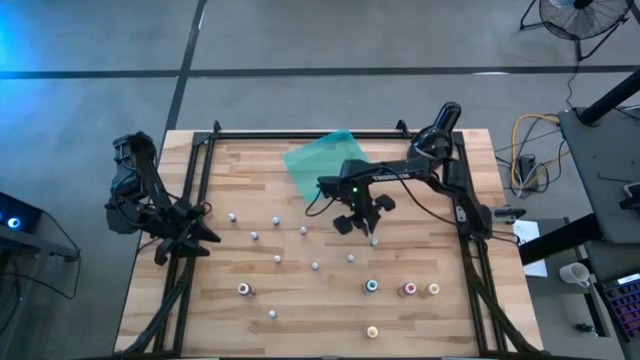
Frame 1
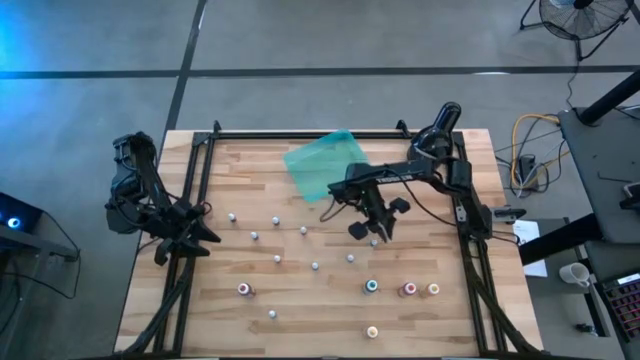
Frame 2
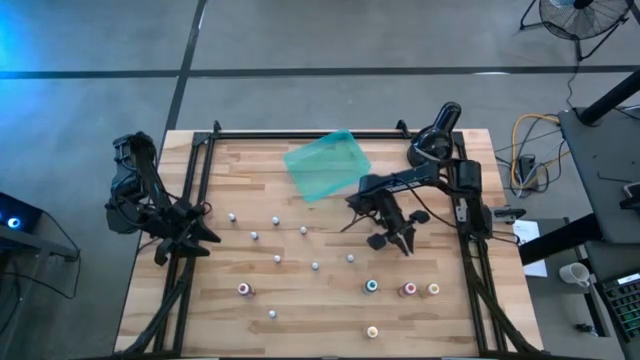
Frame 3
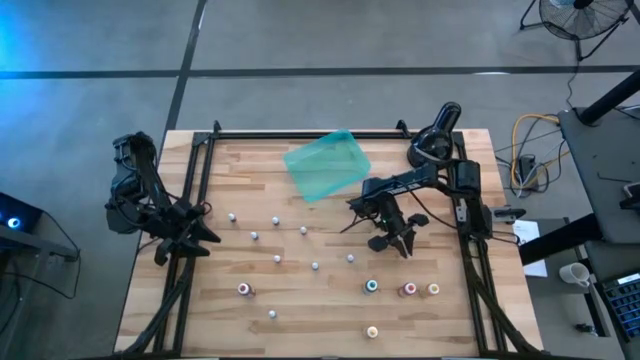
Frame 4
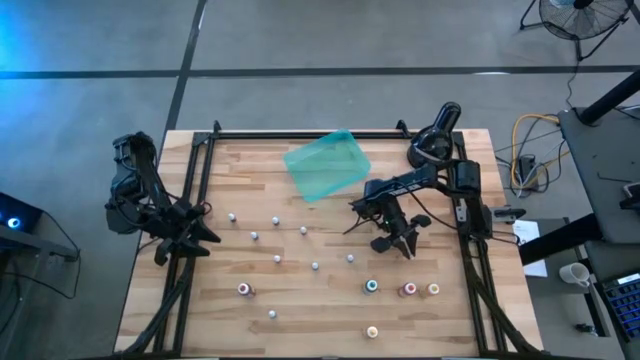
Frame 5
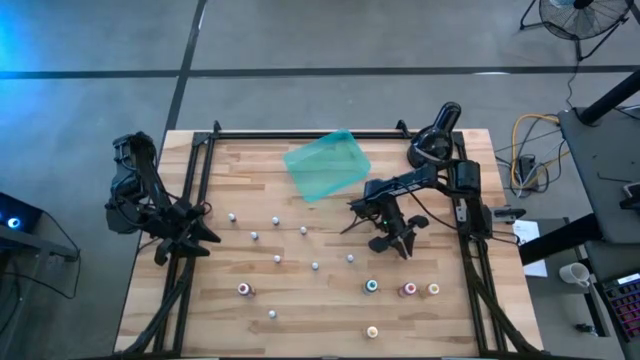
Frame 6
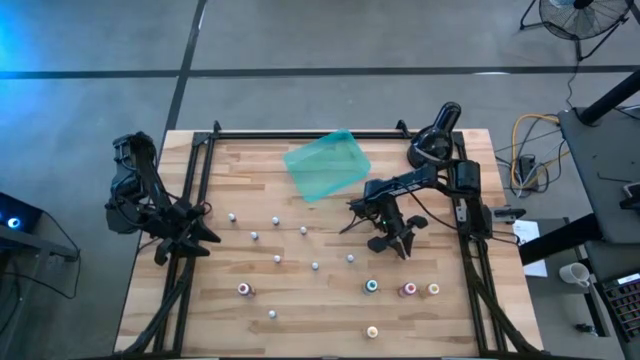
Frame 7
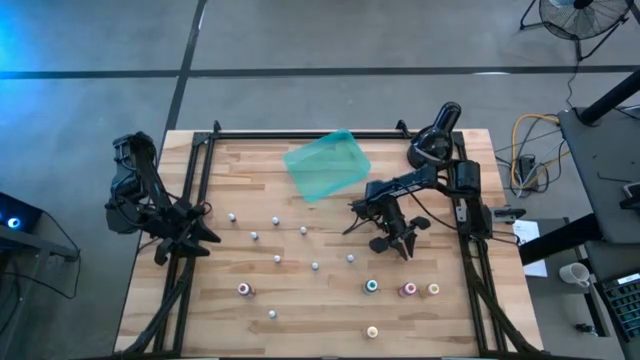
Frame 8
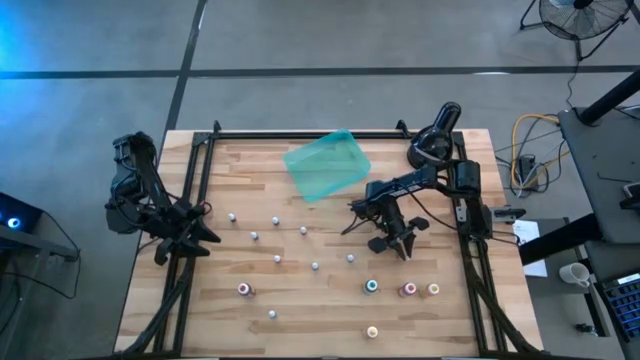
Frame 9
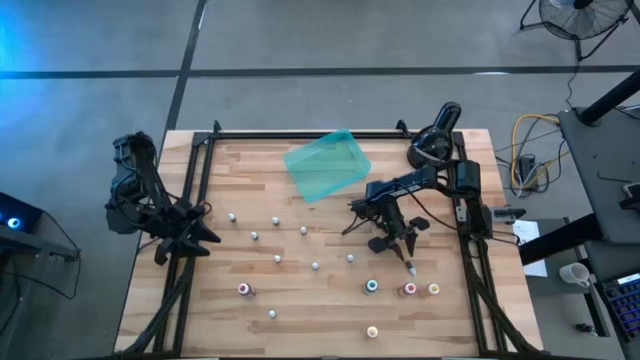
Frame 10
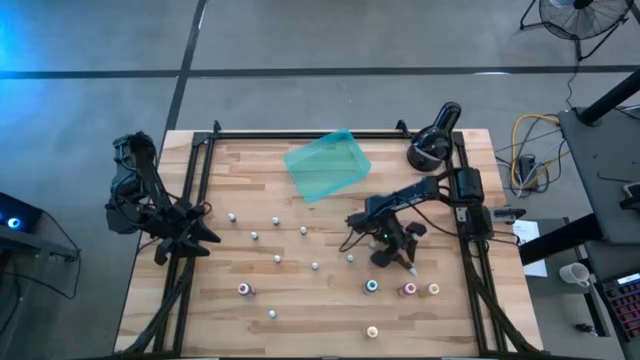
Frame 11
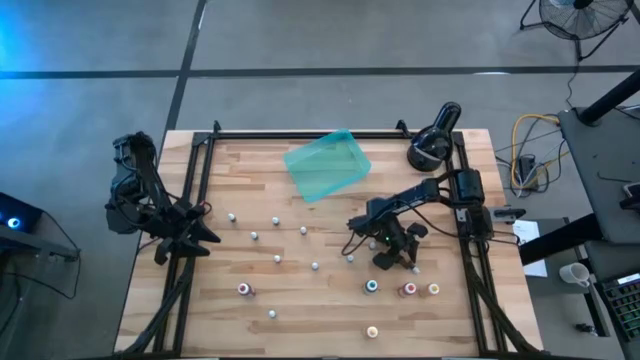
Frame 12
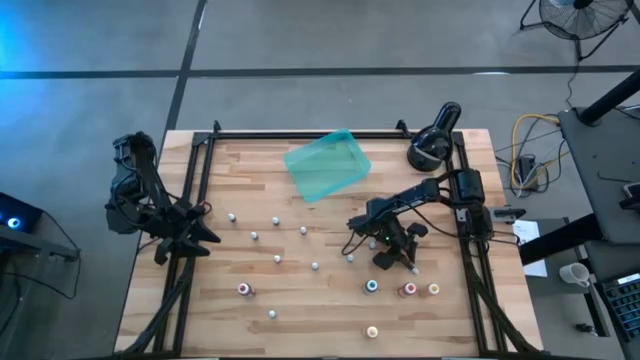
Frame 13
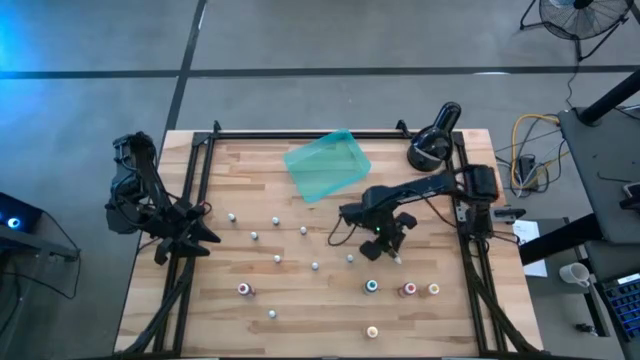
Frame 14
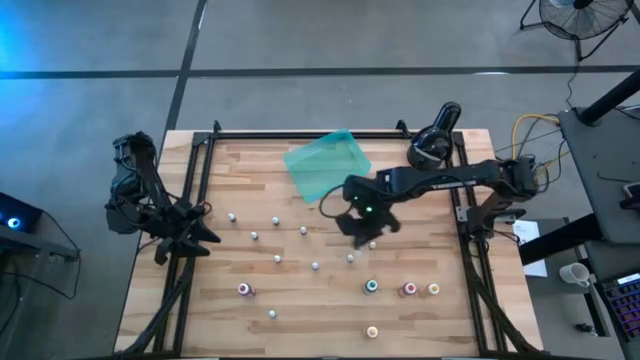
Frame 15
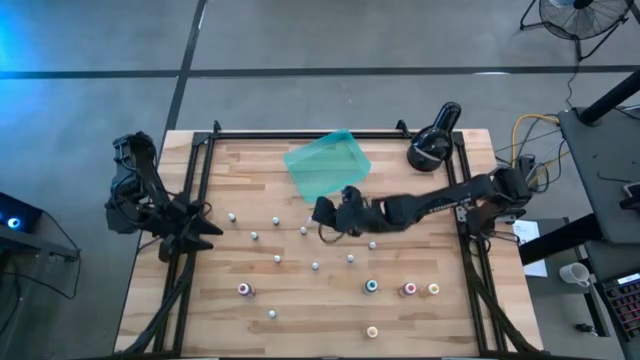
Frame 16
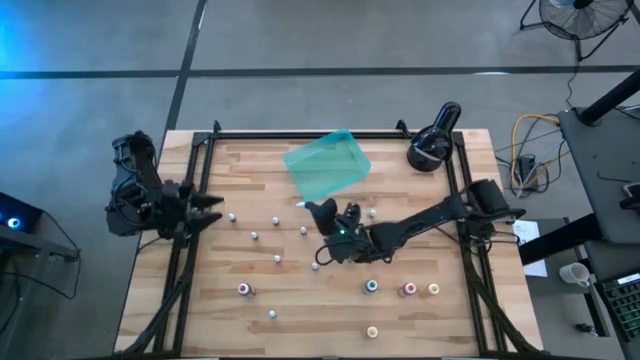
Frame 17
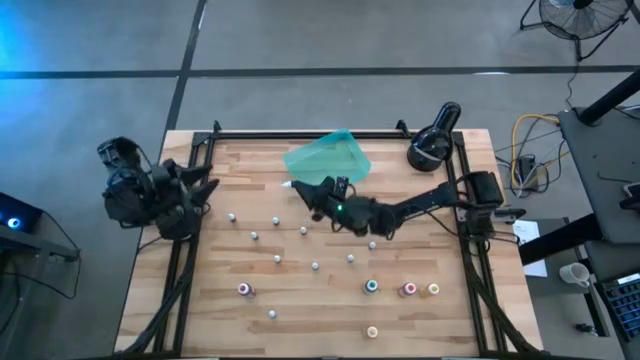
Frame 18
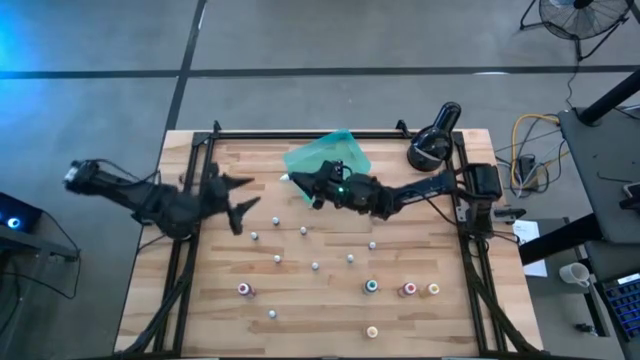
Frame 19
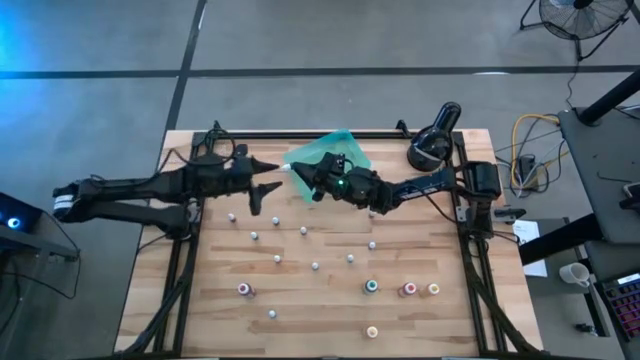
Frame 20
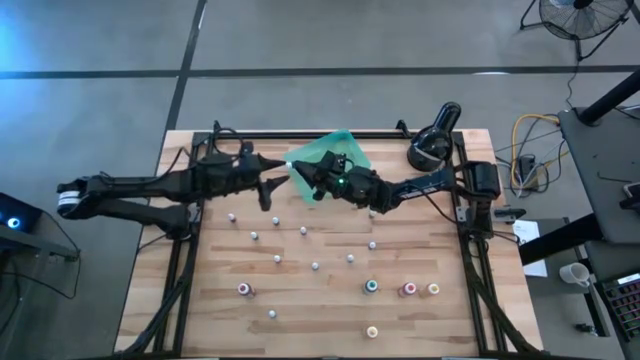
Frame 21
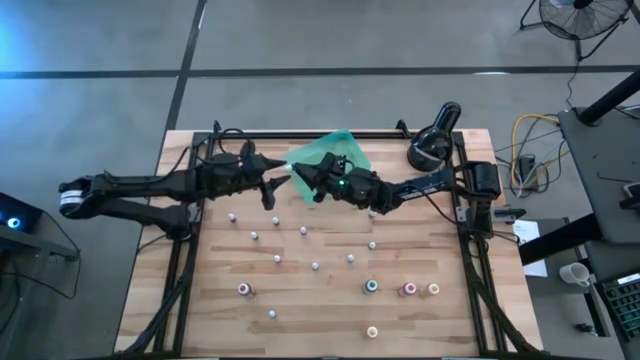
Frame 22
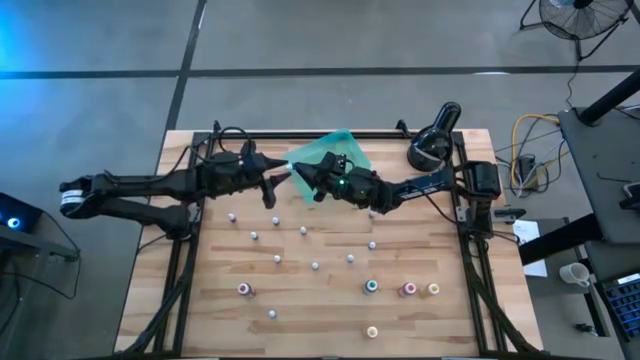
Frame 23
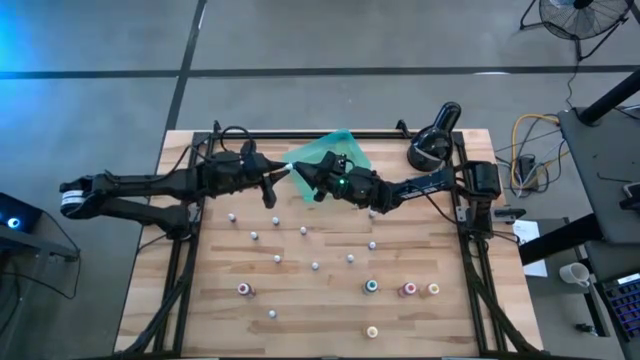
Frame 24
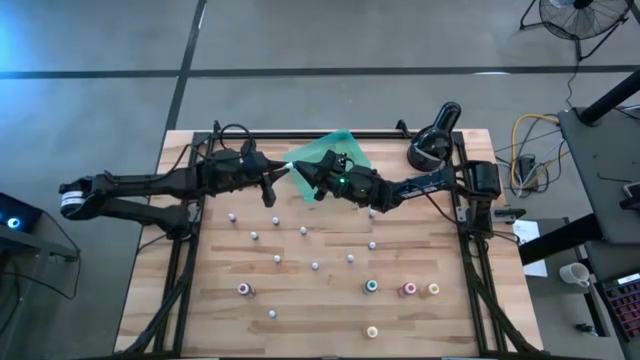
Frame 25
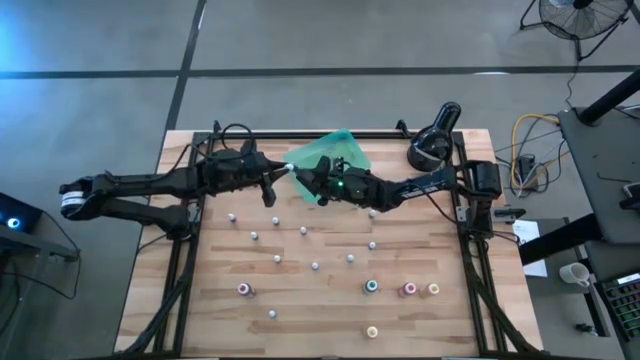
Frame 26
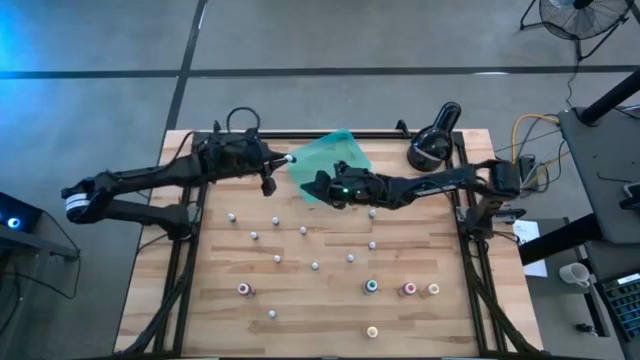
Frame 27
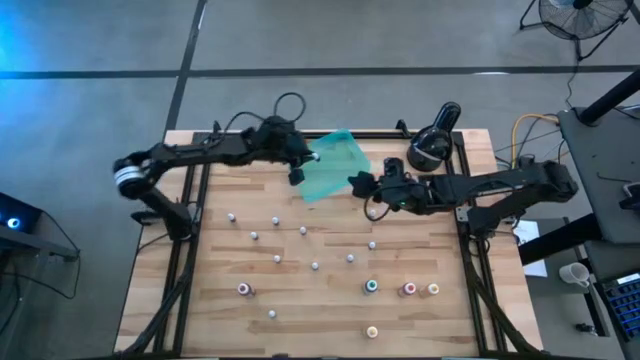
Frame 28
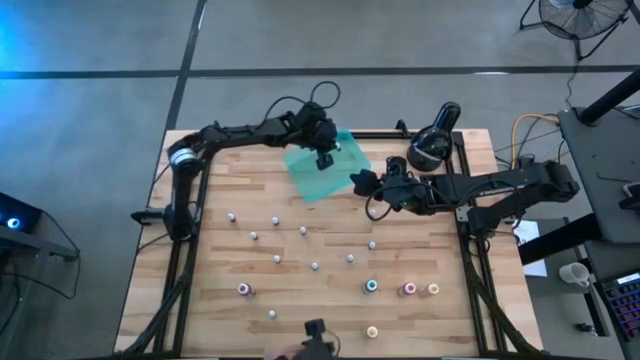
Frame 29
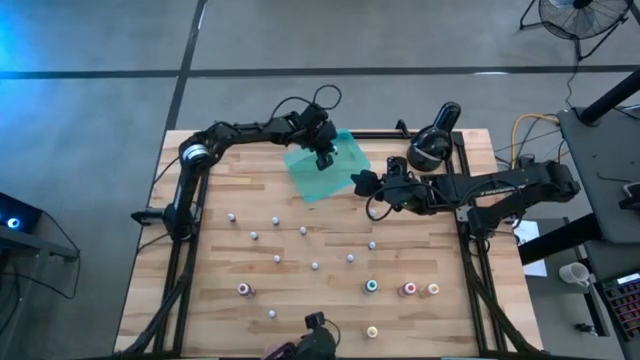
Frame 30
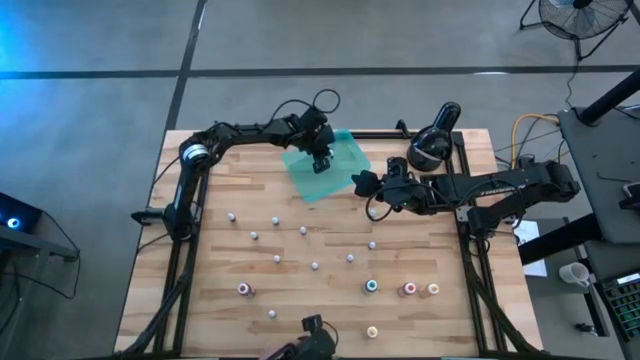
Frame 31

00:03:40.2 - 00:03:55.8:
Task: Pick & Place food coloring
Adjust the red small food coloring bottle

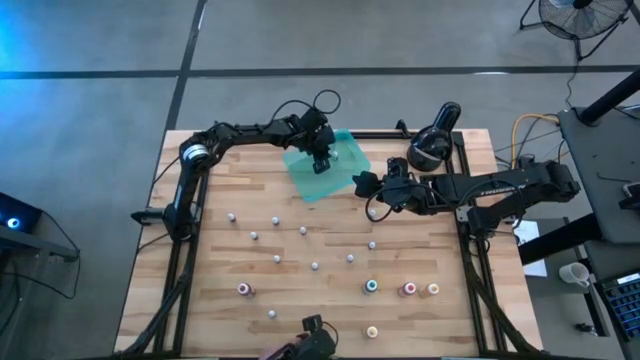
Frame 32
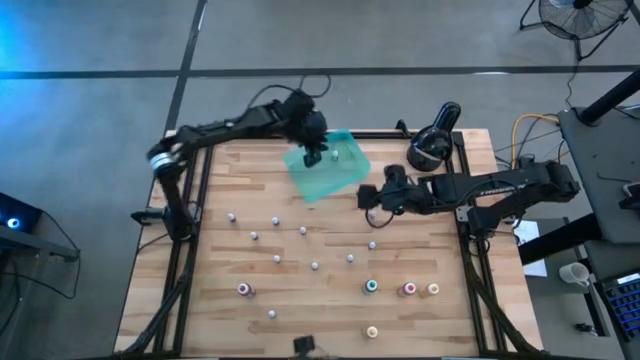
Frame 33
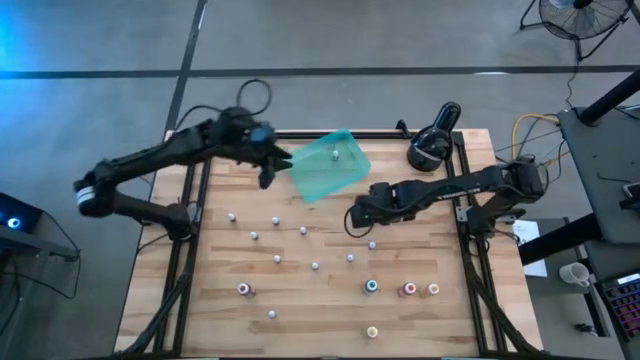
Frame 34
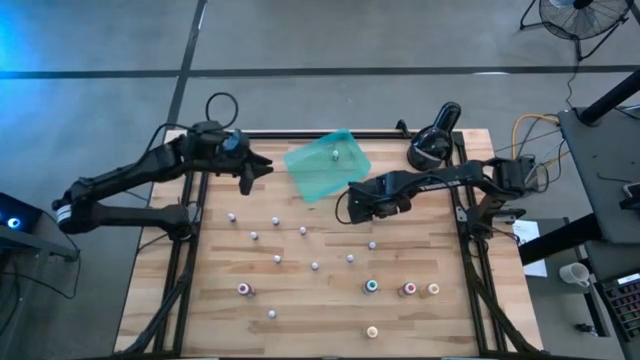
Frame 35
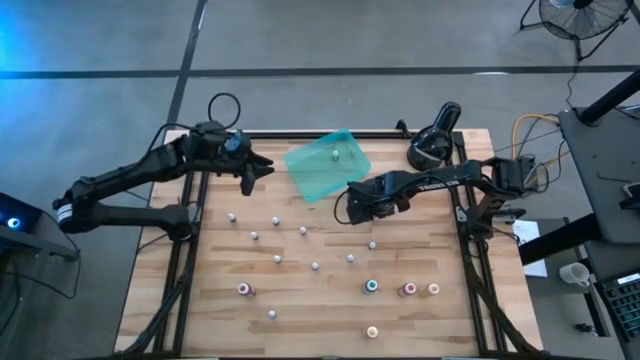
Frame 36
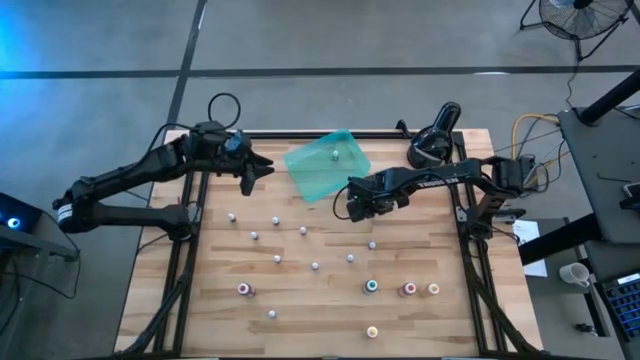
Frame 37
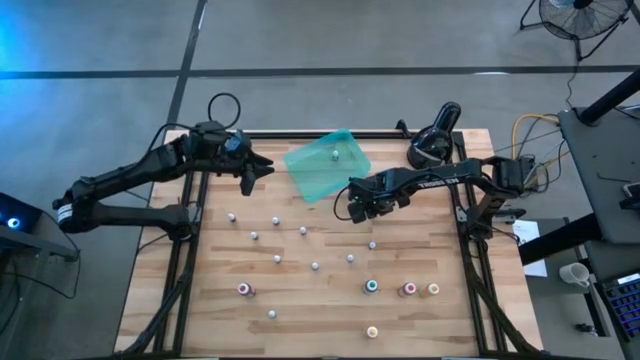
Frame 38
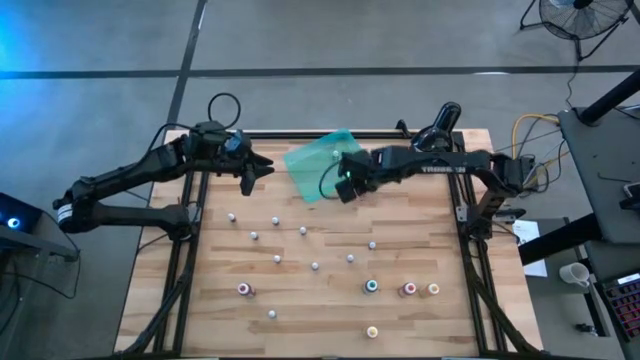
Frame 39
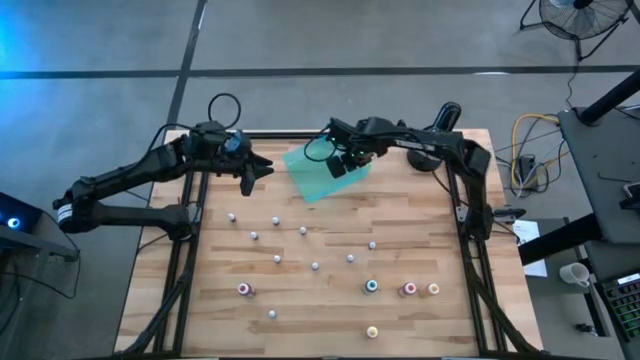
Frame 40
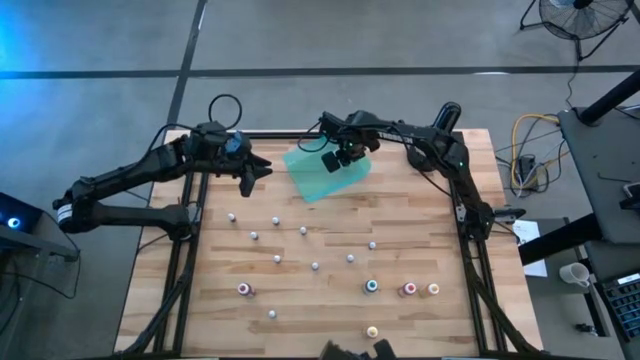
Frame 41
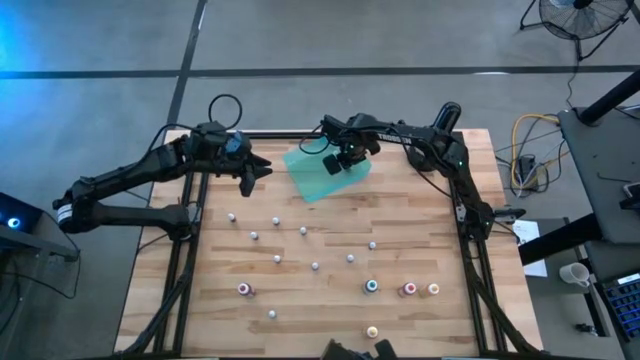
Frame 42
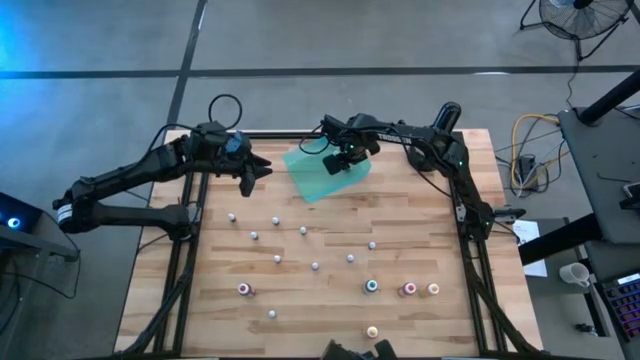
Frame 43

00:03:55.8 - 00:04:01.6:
Put the blue small food coloring into the green bin

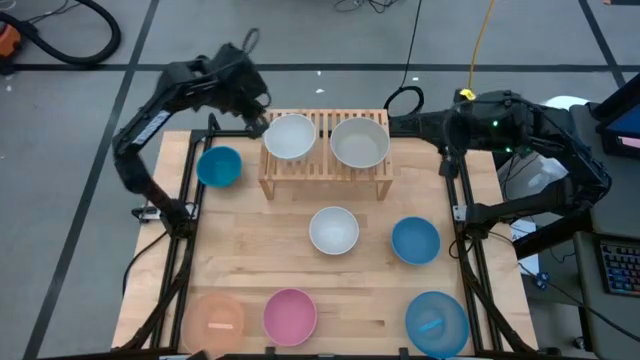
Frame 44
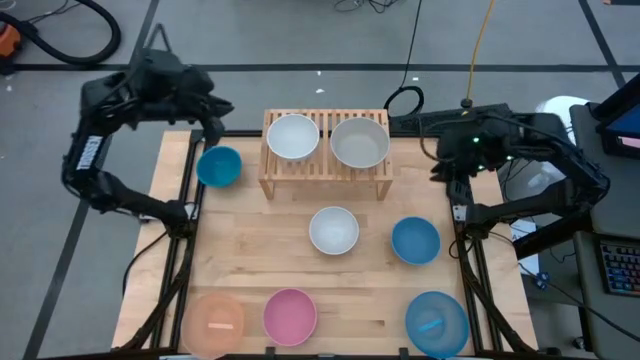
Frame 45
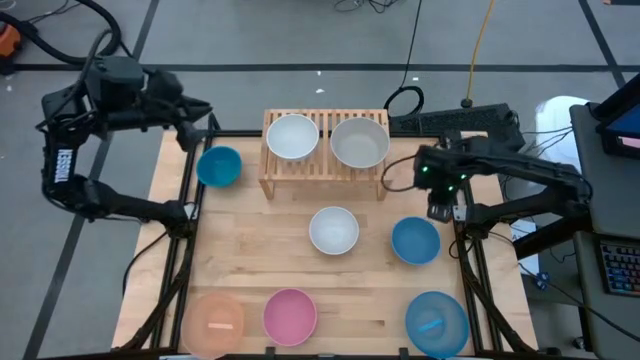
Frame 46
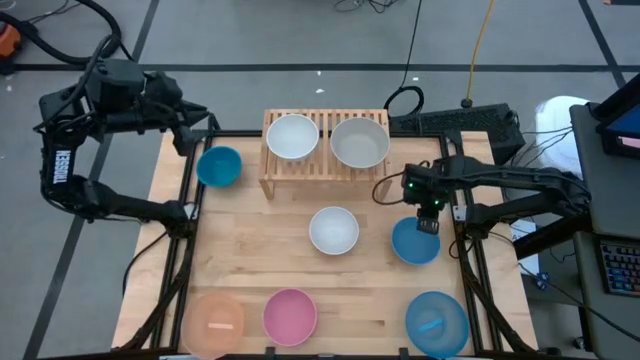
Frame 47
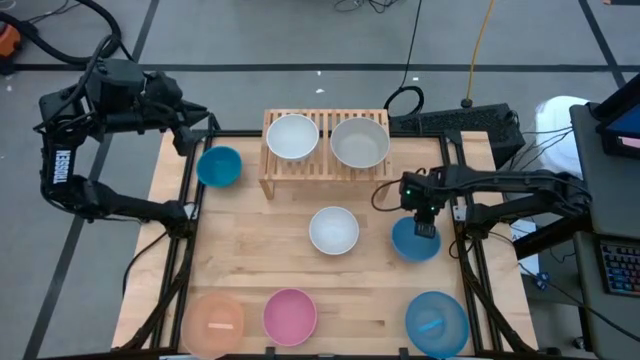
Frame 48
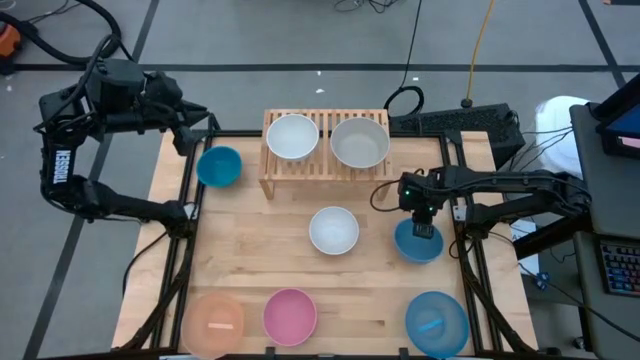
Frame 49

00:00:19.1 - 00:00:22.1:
Task: Place and stack bowls onto a shelf
Stack the bottom small blue bowl on top of the small white bowl on the shelf
